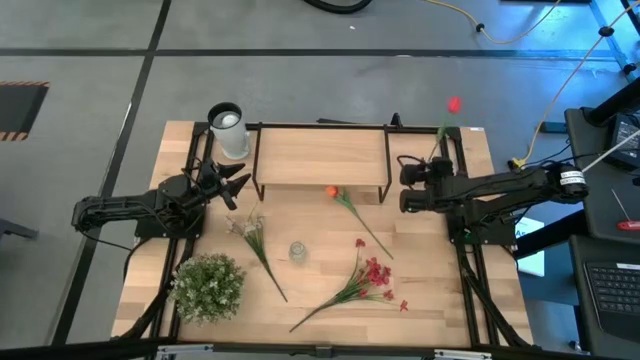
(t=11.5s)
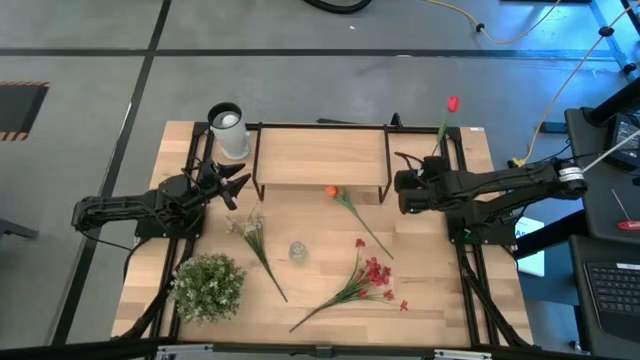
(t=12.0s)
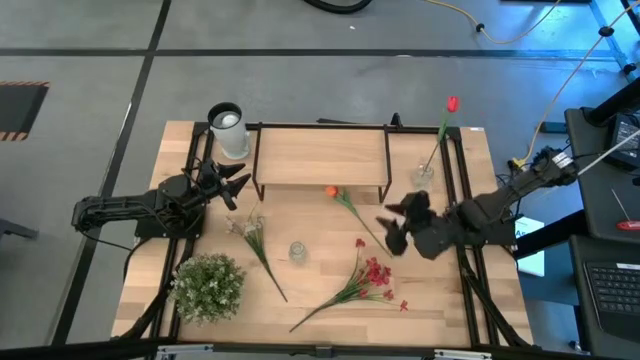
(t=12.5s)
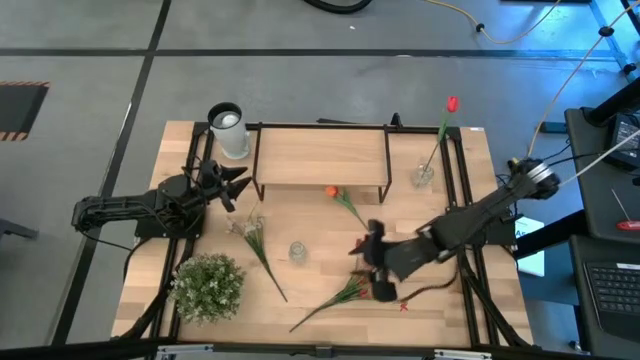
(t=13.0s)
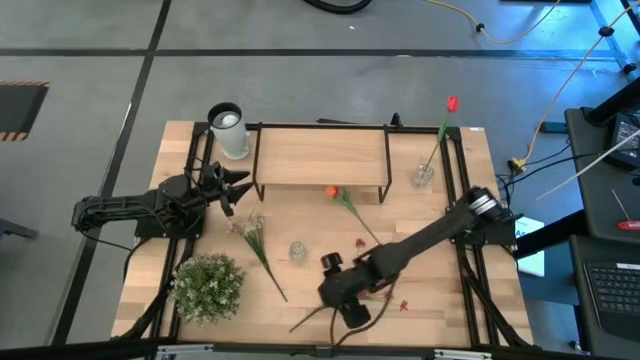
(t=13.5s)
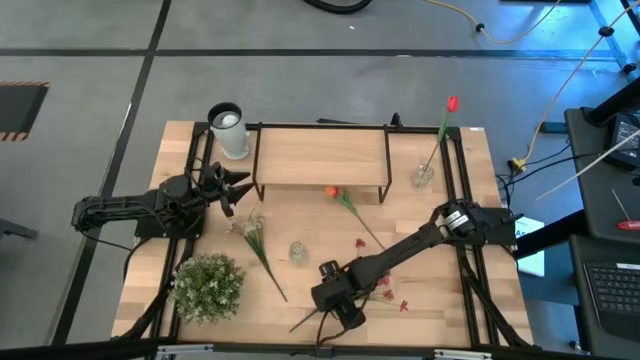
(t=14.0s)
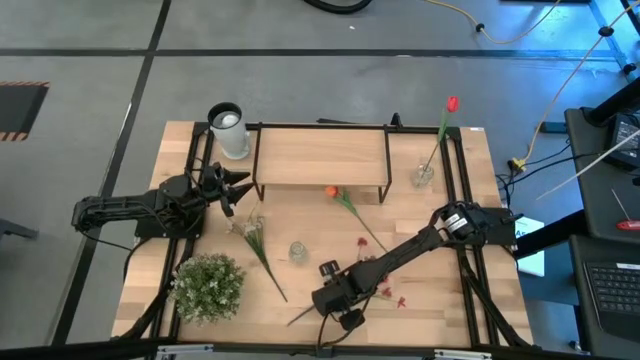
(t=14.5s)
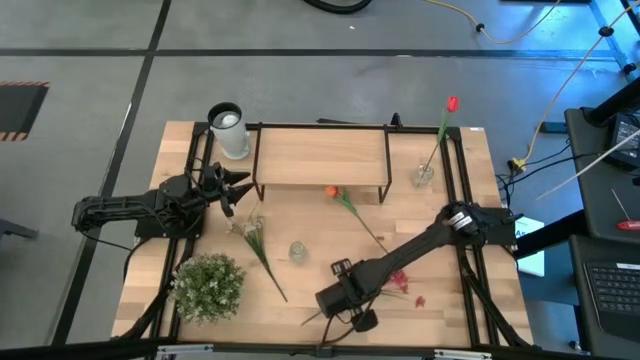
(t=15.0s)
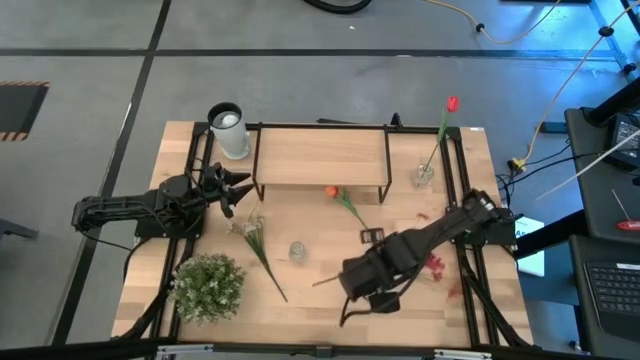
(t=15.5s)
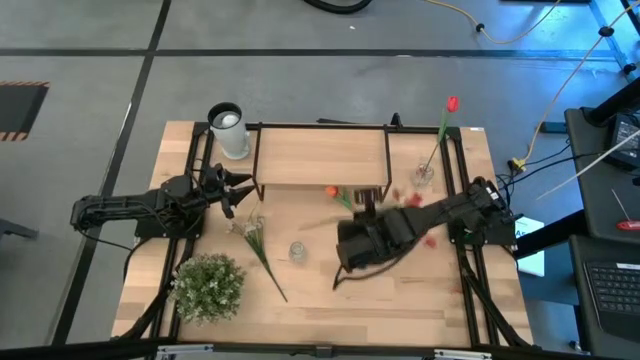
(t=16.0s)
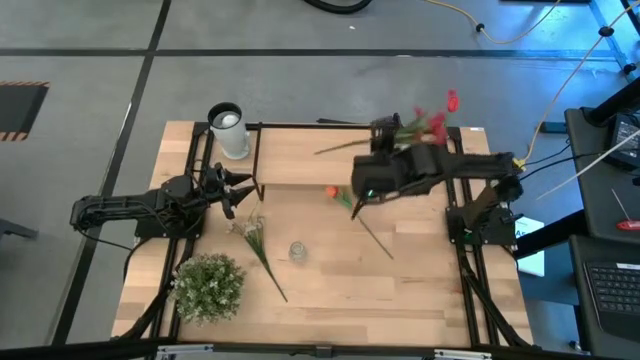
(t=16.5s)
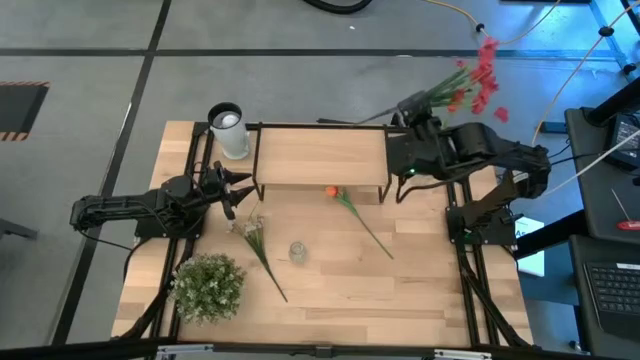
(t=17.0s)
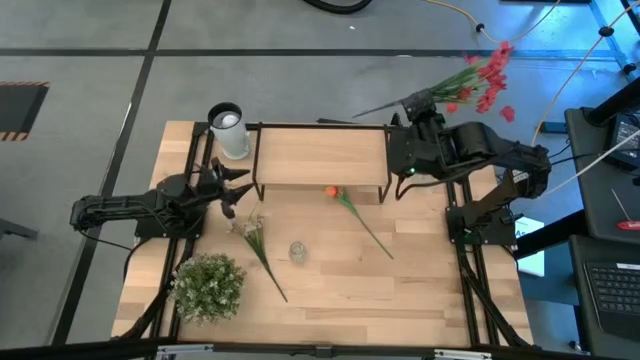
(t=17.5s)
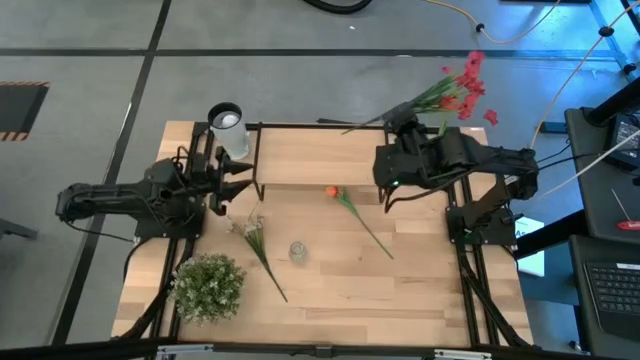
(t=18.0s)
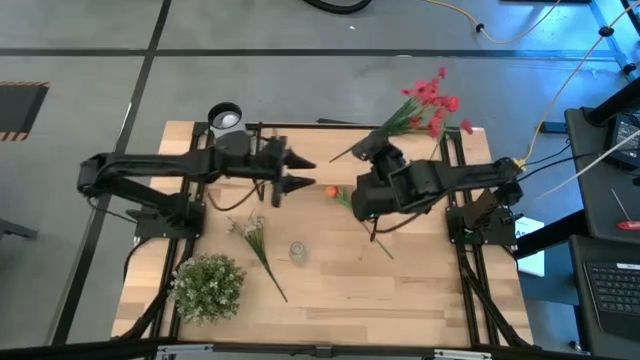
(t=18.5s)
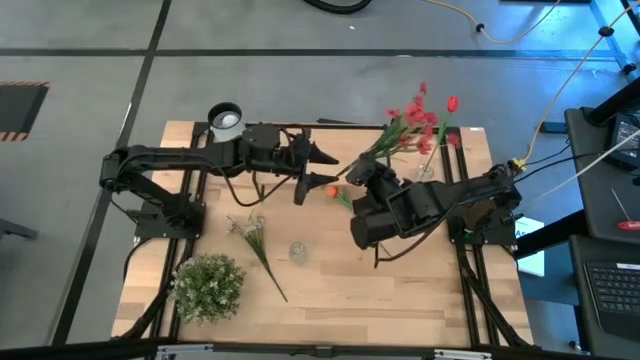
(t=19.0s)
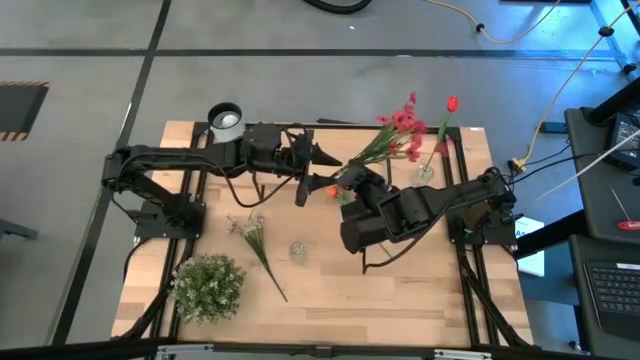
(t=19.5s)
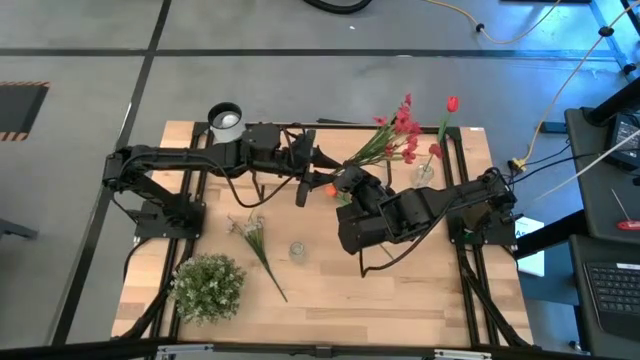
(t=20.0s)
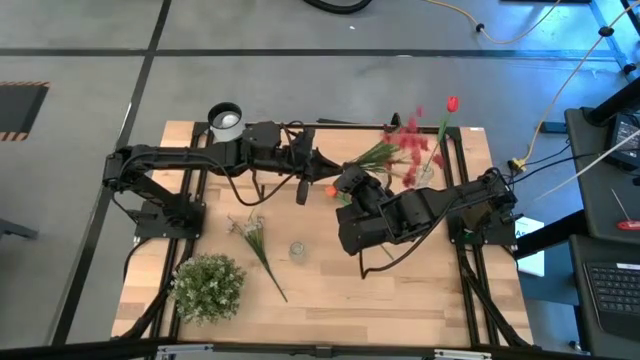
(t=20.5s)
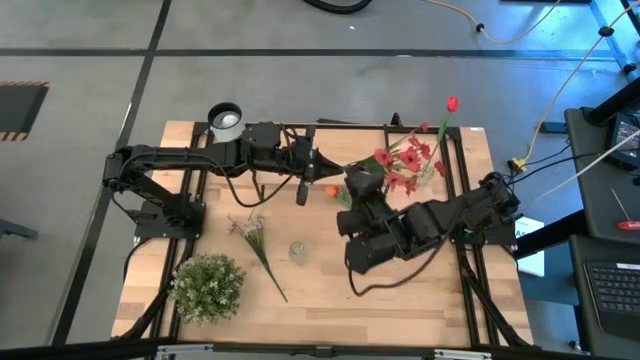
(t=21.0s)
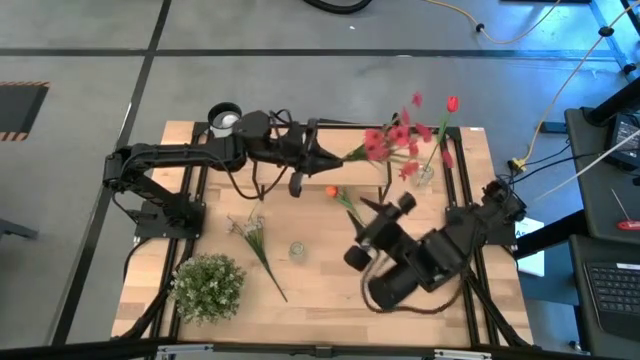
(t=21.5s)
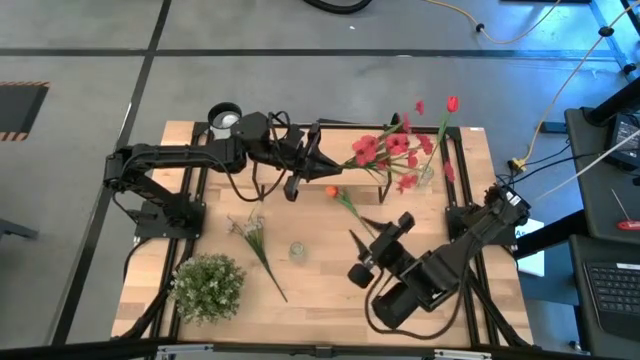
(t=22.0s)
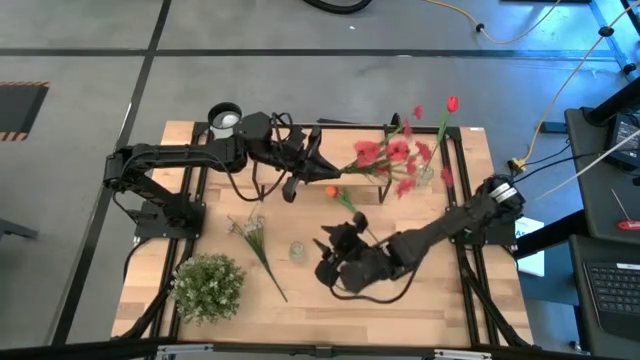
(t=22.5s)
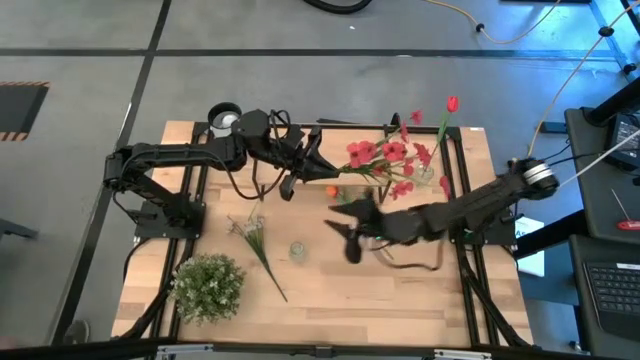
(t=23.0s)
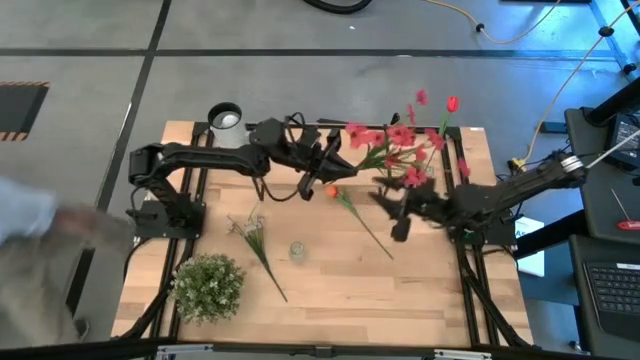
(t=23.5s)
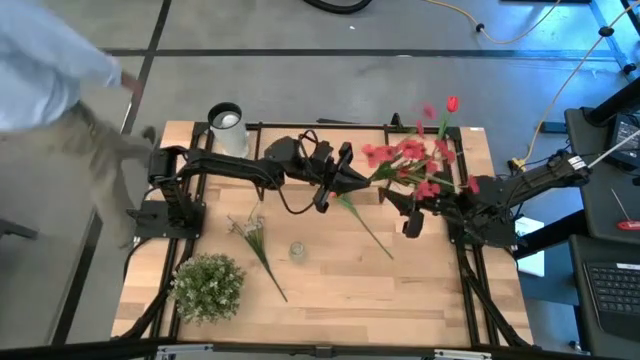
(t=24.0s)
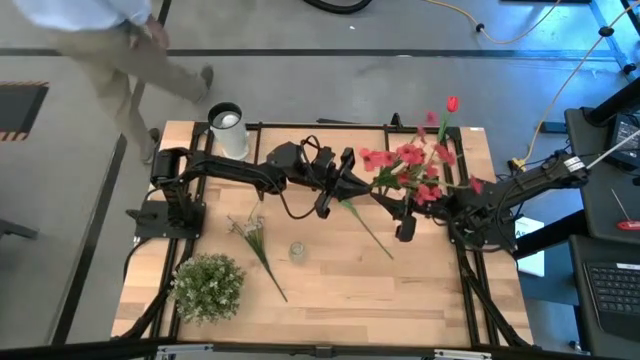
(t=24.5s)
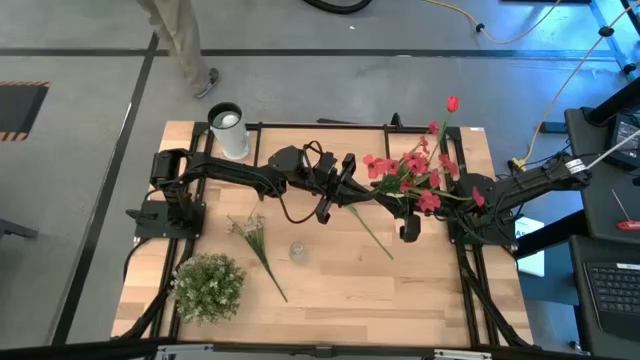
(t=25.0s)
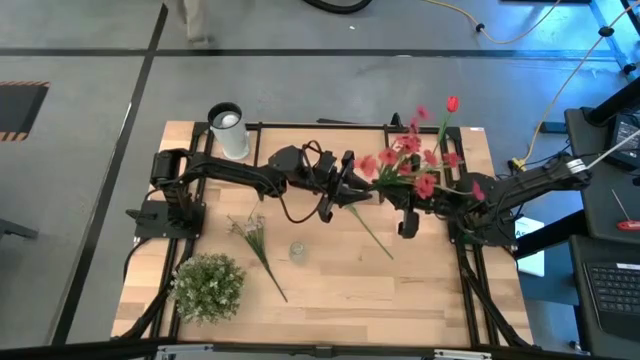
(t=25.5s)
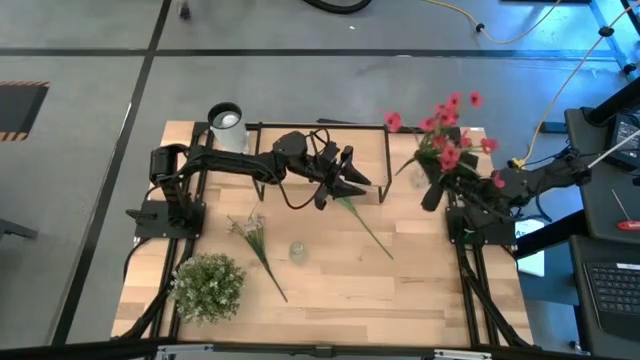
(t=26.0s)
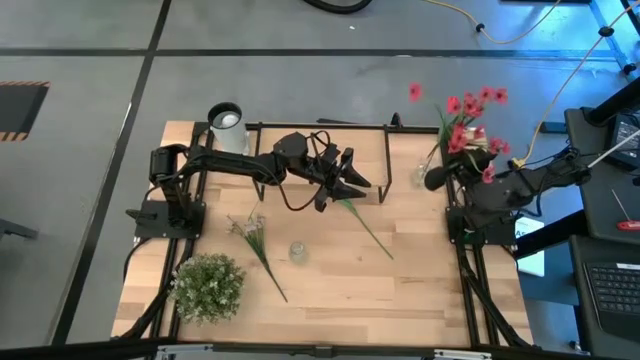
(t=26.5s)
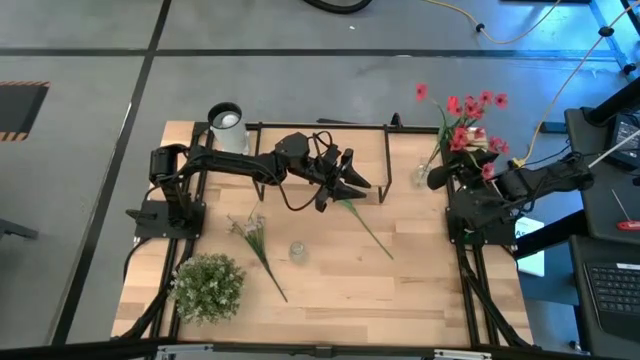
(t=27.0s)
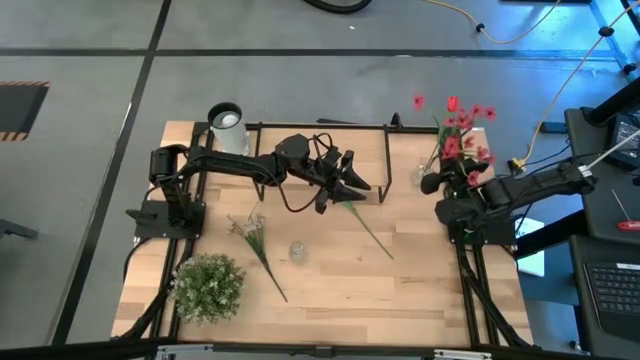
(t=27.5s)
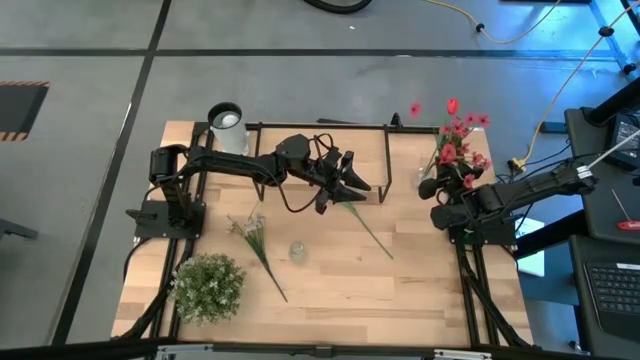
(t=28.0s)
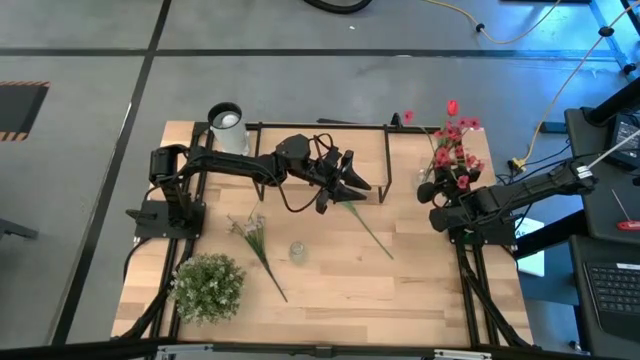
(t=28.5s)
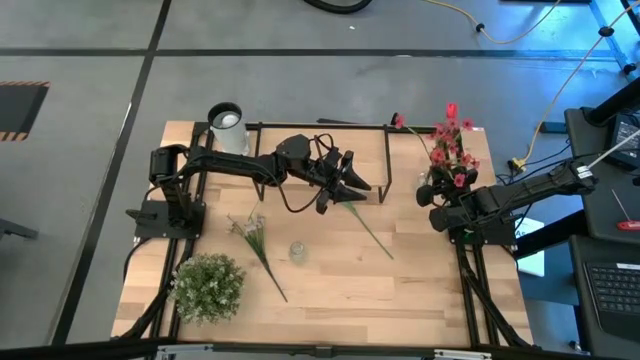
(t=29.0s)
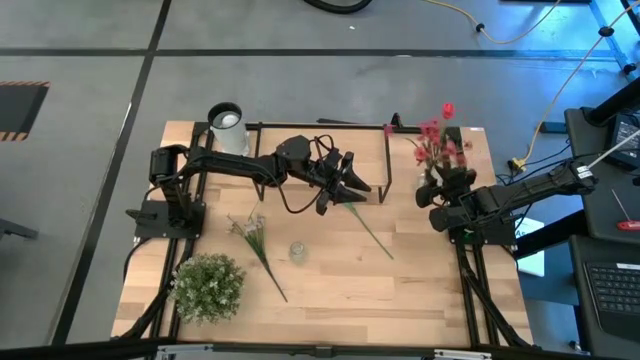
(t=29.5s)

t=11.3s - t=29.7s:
Task: Pick and place flowers into a vace then onto a shelf
Put the red flower into the top transparent vase

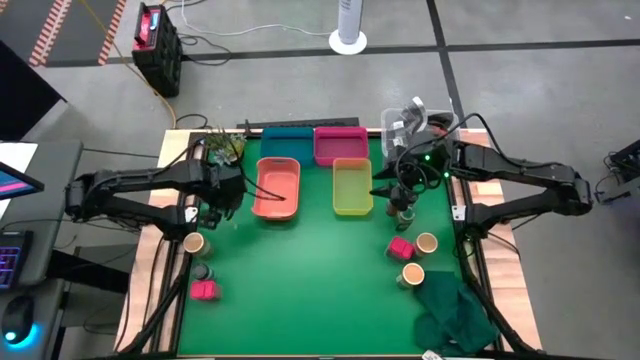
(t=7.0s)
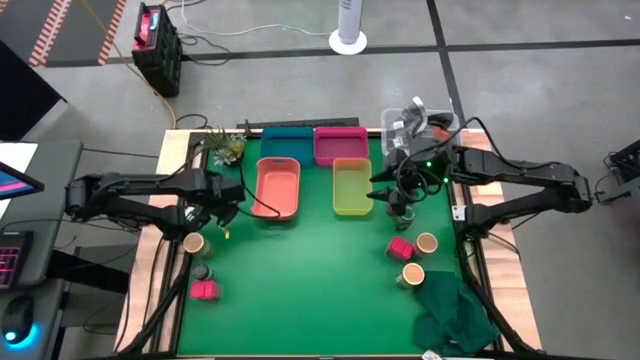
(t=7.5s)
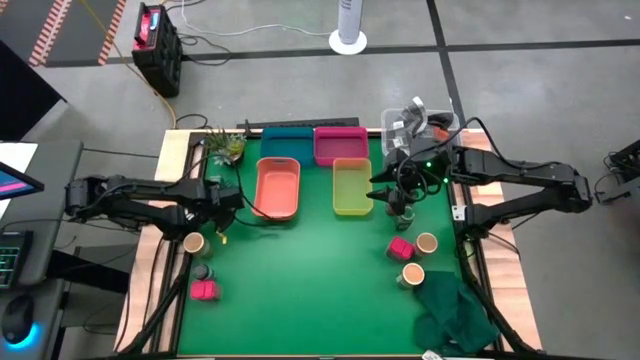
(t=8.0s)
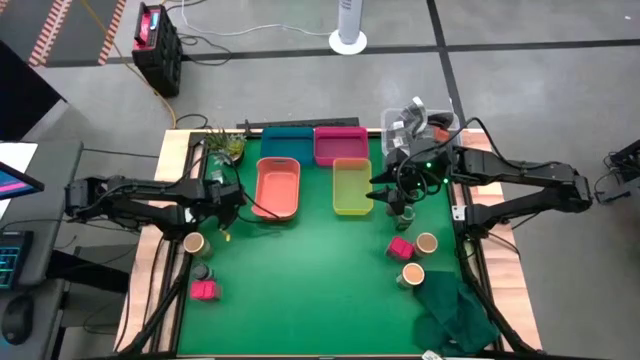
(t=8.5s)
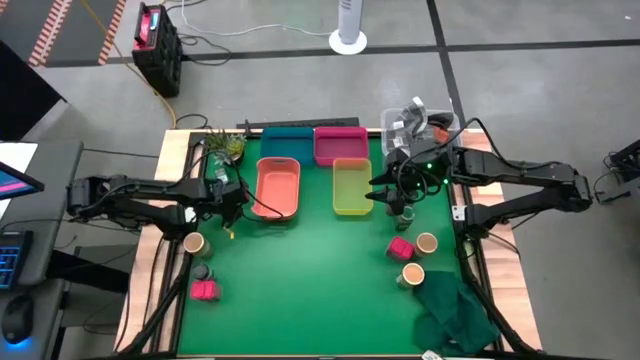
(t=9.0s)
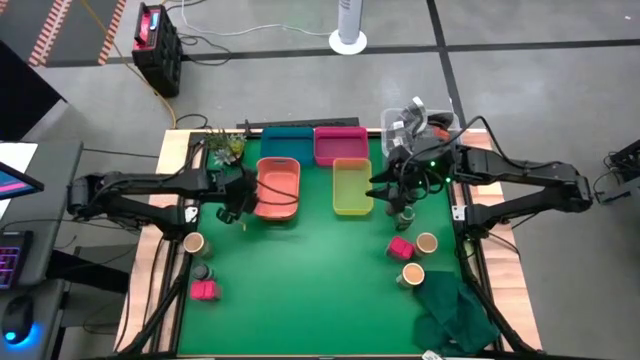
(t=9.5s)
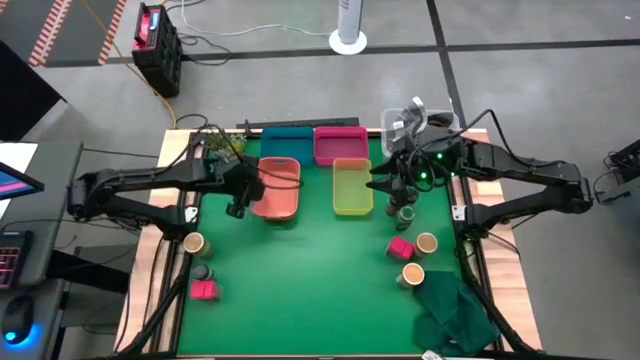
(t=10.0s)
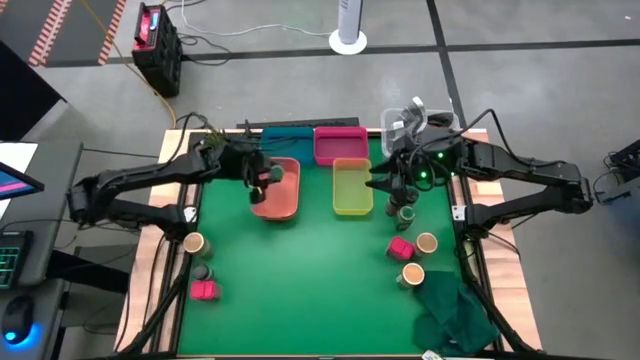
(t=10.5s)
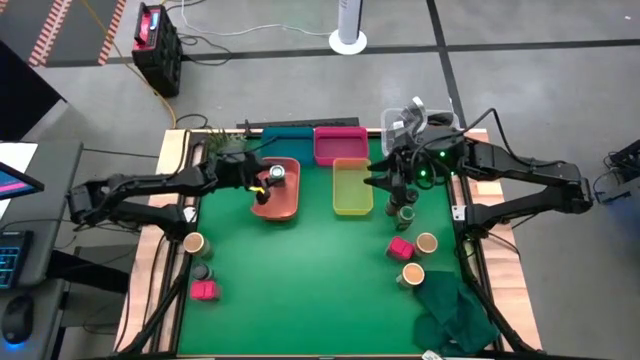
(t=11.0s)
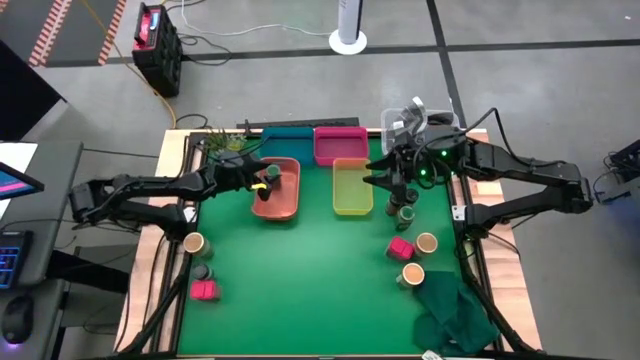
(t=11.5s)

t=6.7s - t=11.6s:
Task: Sort spices by type
Put the left seasoning bottle into the orange bin
